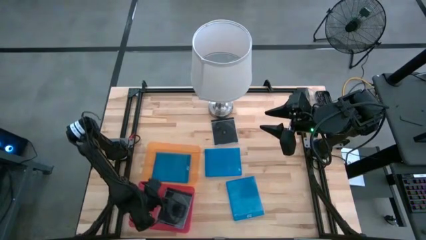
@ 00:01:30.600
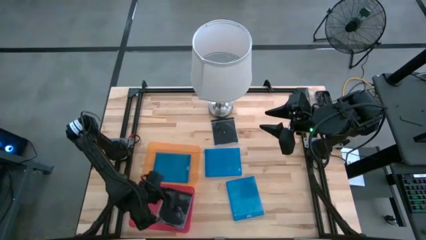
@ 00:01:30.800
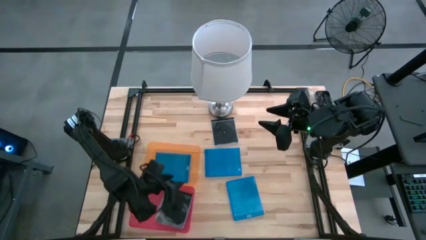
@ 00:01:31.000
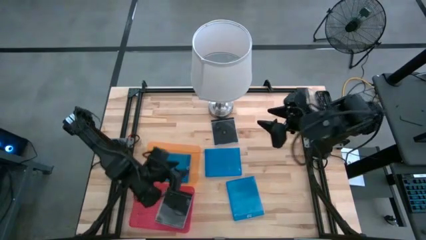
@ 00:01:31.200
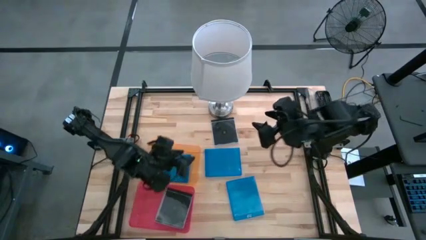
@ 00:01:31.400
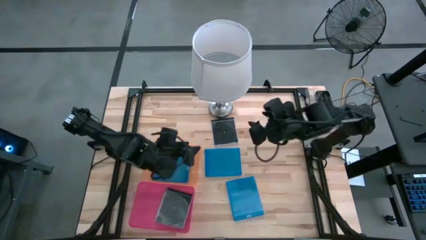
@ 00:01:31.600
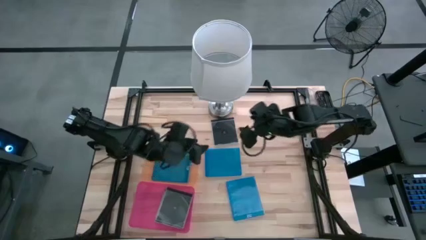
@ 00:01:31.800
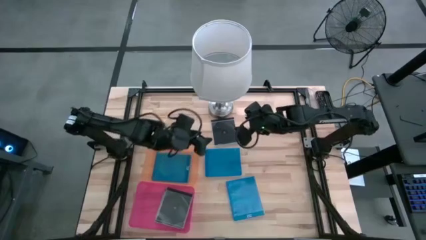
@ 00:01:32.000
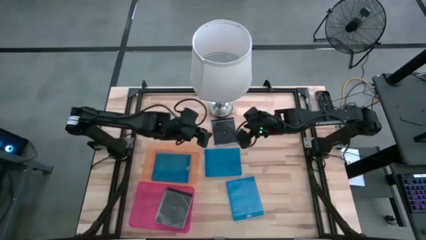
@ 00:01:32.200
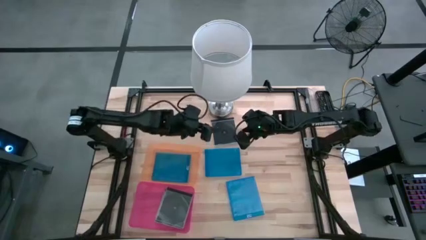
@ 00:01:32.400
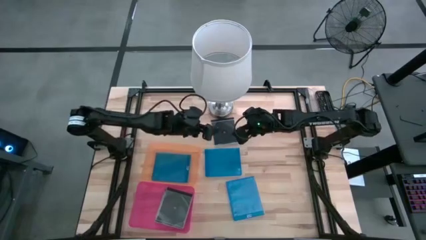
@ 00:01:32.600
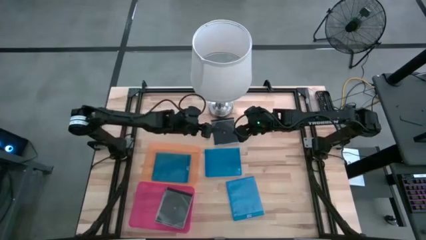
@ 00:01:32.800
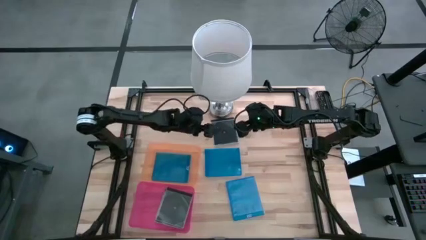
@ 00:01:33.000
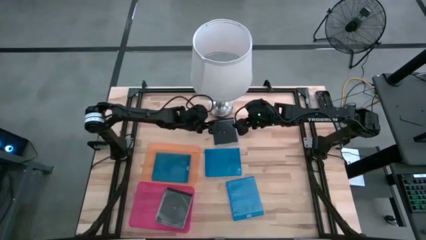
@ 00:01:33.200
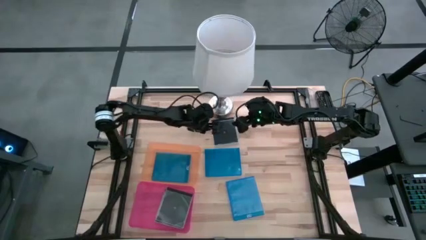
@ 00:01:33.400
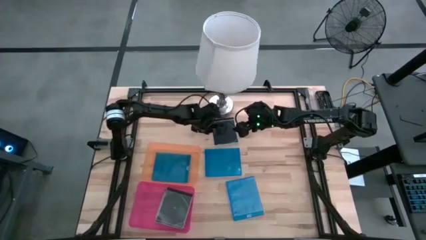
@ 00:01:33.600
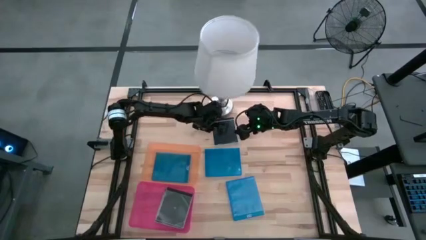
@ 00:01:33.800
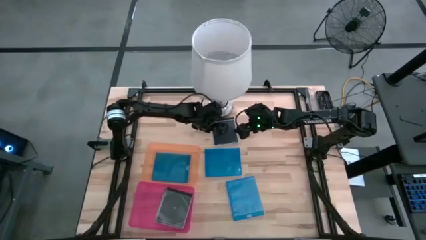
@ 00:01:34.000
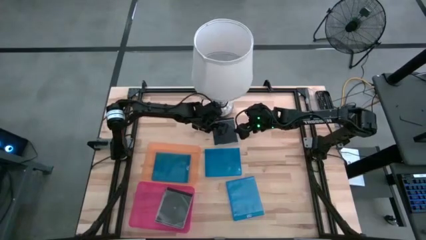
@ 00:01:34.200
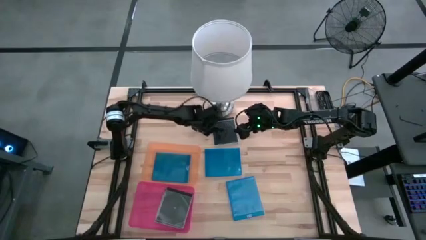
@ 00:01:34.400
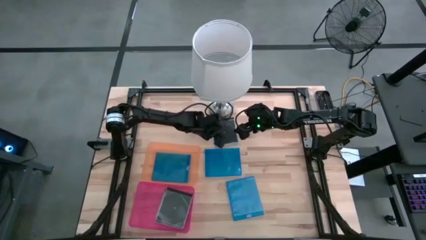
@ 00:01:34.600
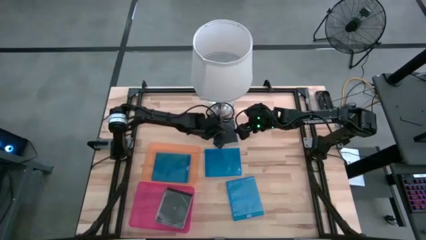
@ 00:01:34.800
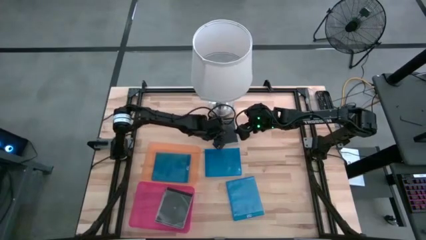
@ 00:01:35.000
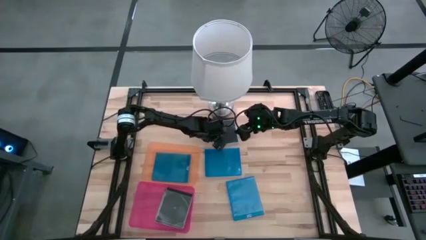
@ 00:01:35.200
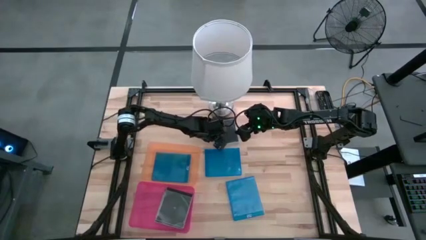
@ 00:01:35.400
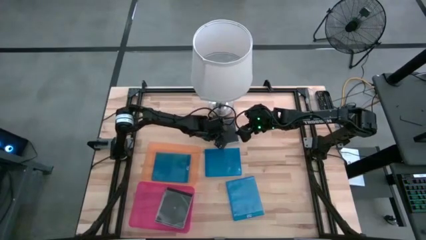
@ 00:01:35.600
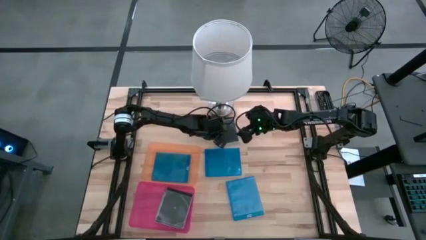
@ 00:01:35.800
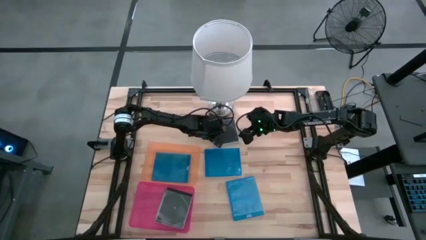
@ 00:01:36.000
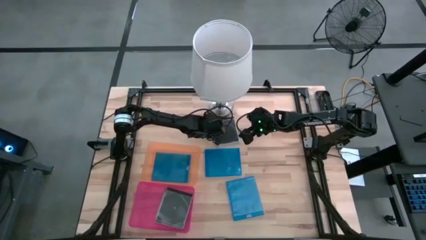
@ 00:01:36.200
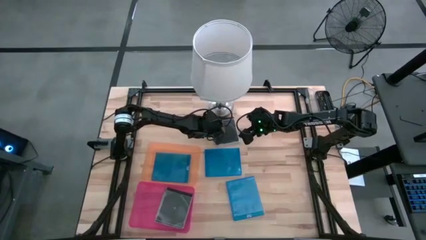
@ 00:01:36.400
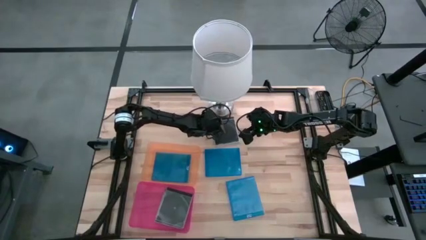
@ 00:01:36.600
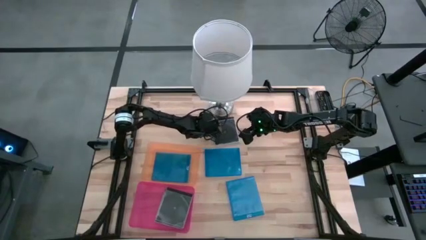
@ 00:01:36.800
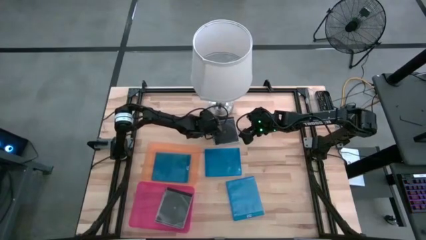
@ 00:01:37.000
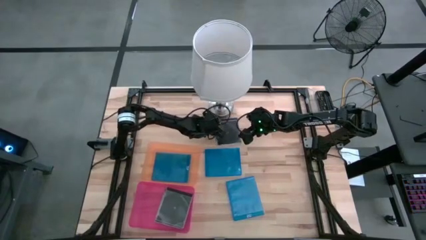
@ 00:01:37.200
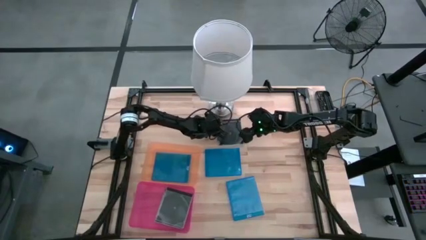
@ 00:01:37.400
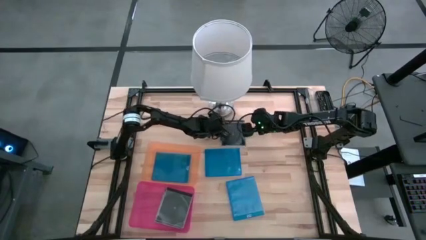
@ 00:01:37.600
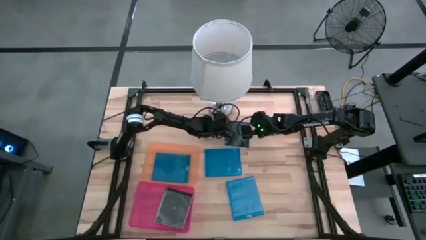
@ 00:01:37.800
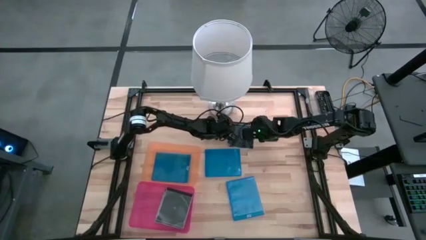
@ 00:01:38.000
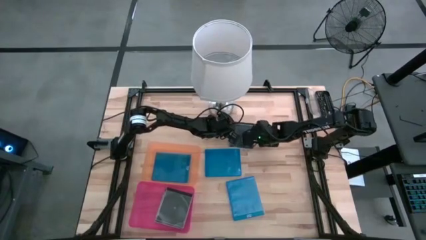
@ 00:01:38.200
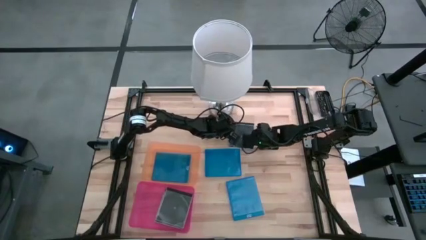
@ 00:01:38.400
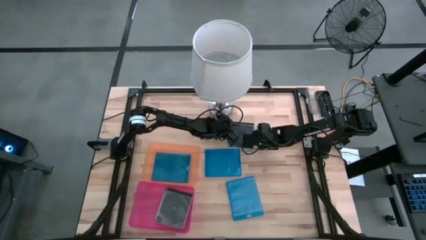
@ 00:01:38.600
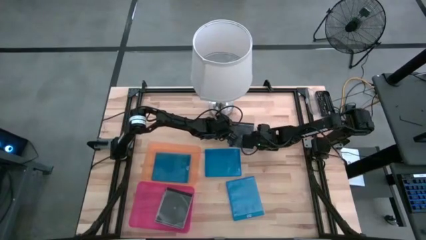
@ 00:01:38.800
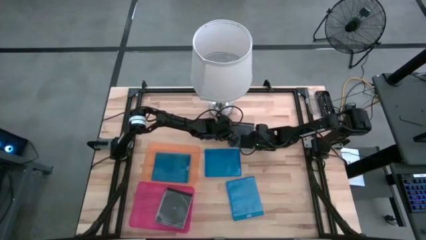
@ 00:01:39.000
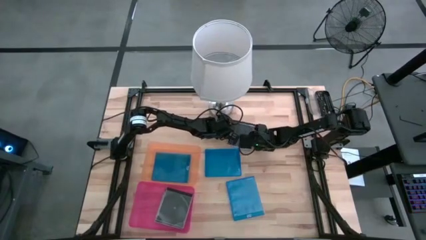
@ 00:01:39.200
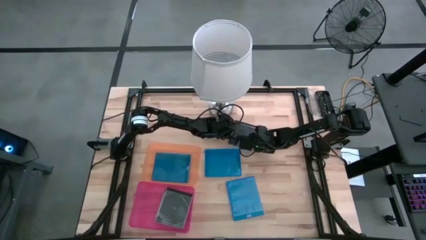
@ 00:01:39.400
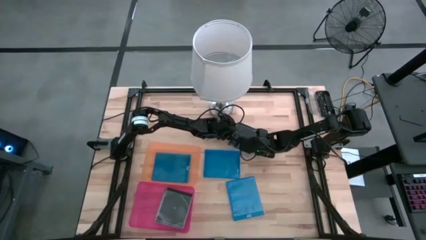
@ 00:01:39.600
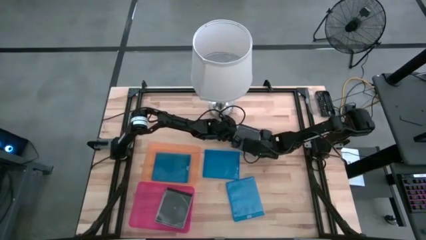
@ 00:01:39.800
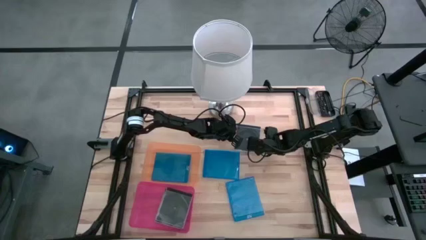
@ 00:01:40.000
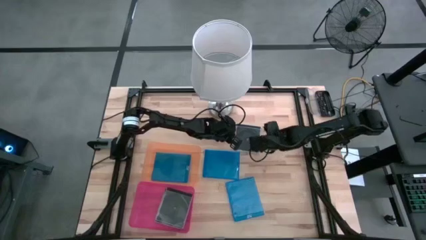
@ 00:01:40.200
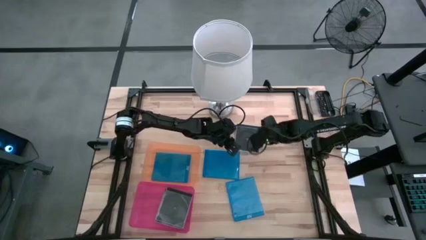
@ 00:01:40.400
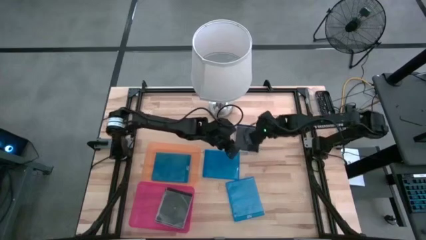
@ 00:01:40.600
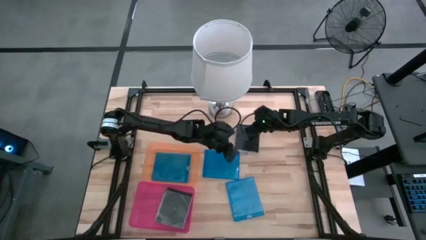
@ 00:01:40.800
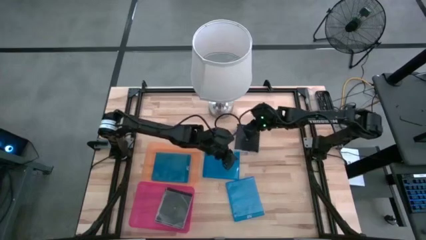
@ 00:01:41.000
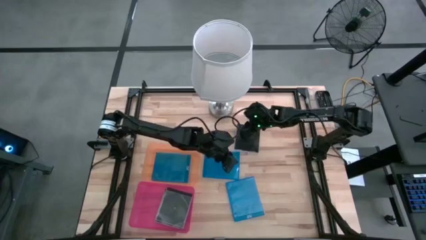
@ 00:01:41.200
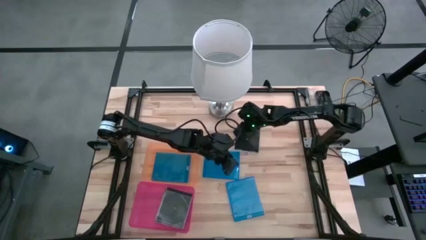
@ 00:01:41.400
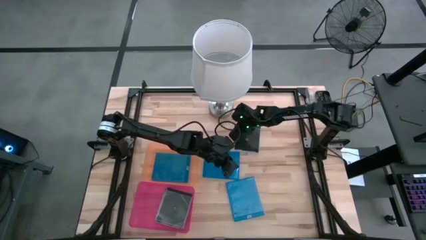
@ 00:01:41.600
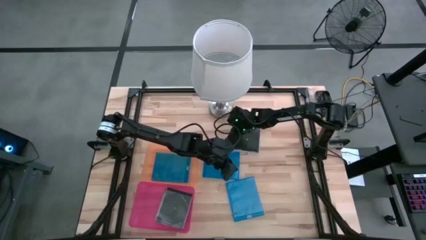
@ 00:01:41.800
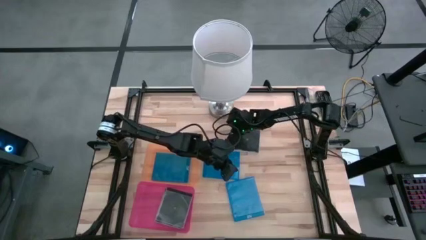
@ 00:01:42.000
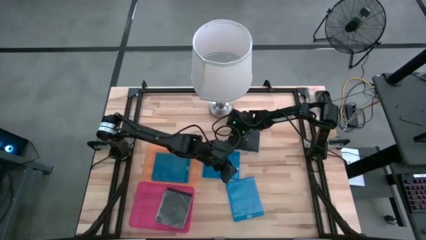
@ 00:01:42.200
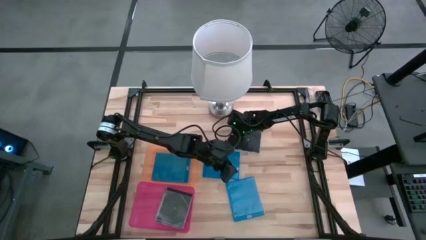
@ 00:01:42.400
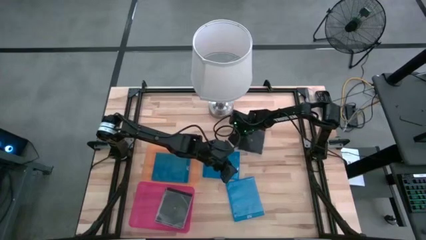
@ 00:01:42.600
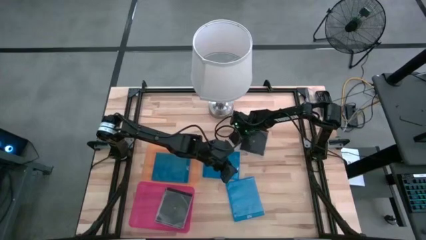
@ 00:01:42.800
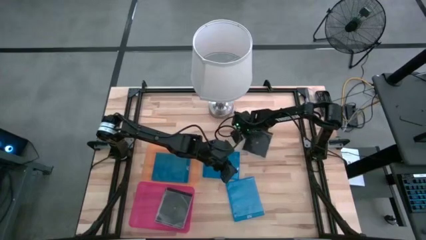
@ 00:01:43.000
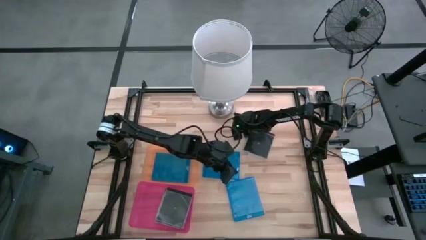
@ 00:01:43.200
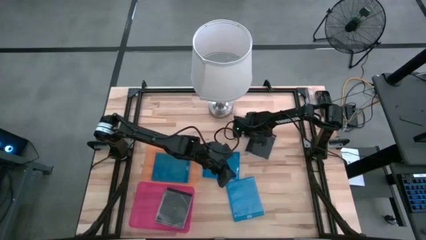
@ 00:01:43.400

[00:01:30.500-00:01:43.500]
Task: Pick & place jewel cases by type
Put the black CD case into the pink bin
